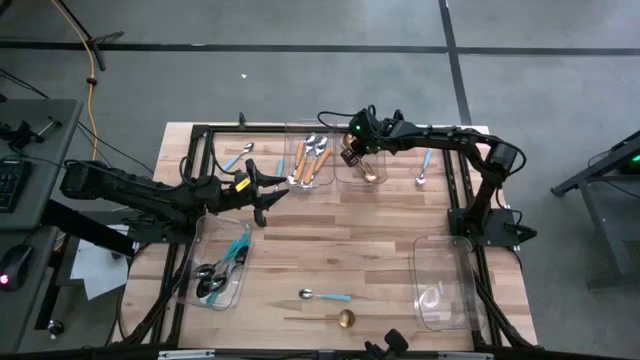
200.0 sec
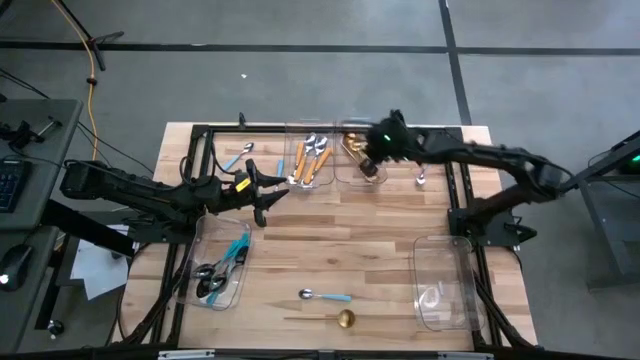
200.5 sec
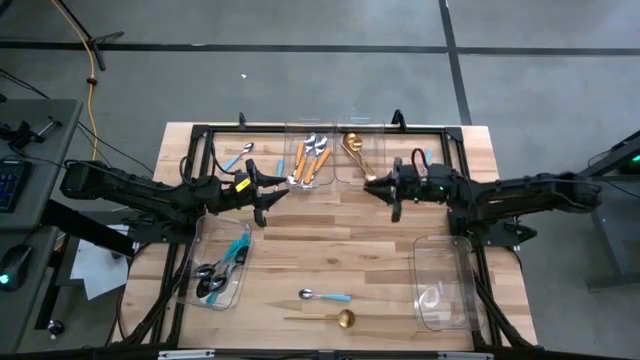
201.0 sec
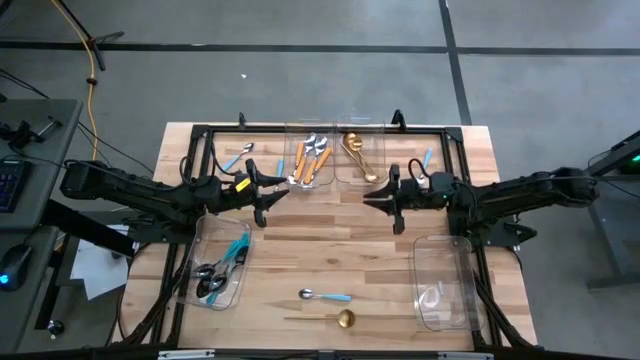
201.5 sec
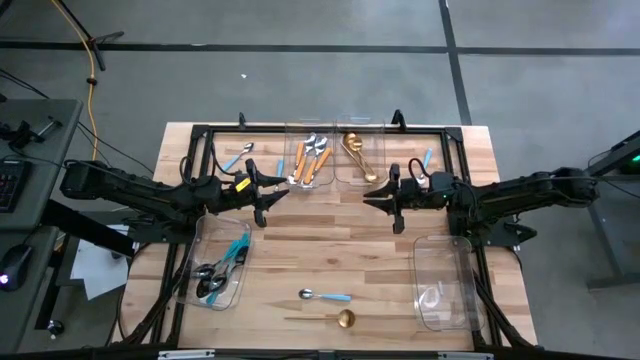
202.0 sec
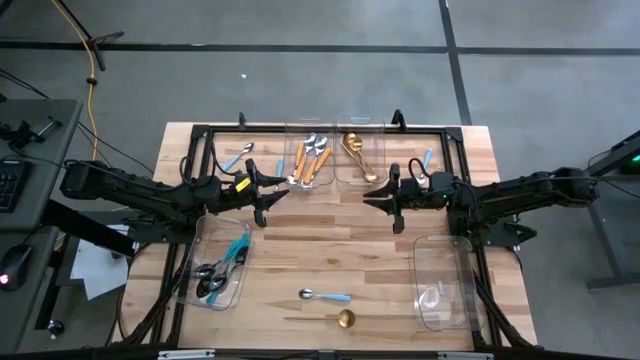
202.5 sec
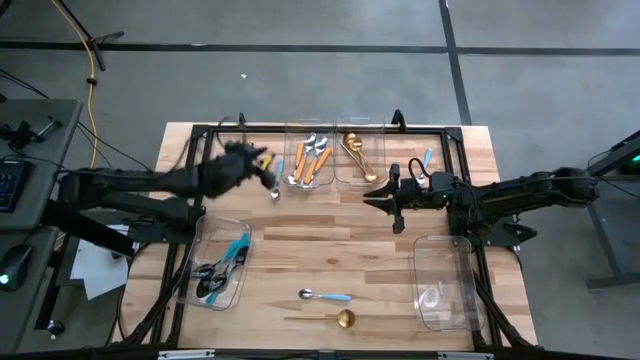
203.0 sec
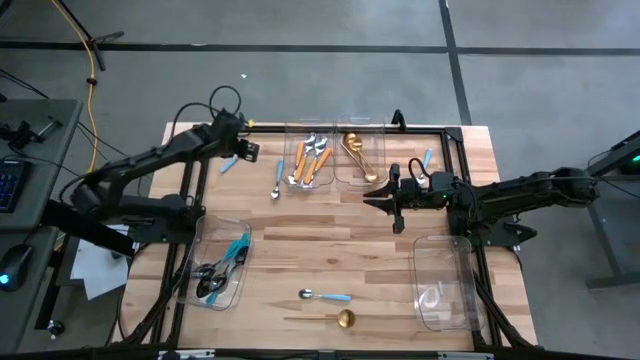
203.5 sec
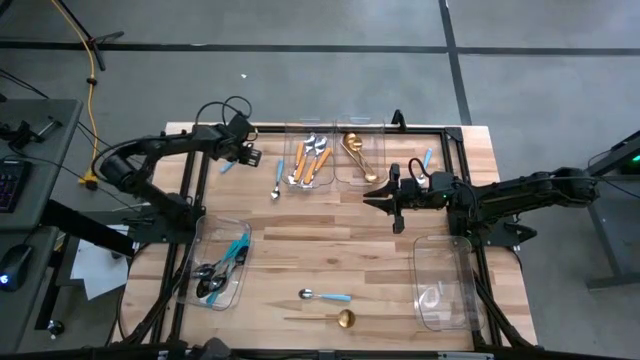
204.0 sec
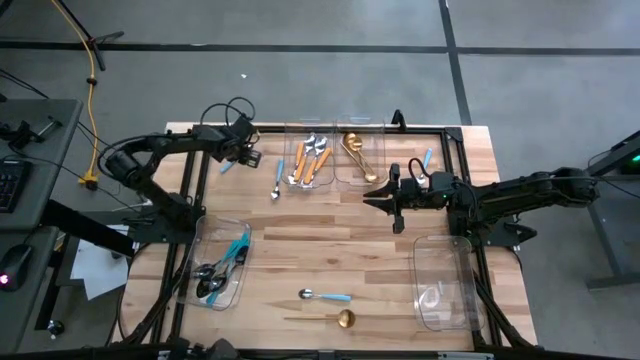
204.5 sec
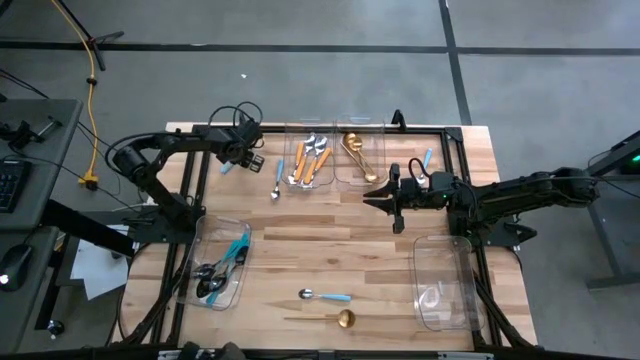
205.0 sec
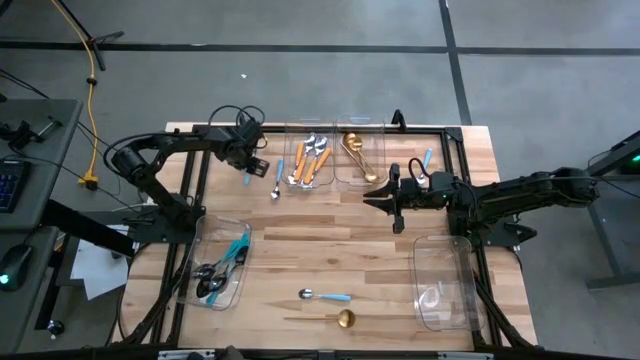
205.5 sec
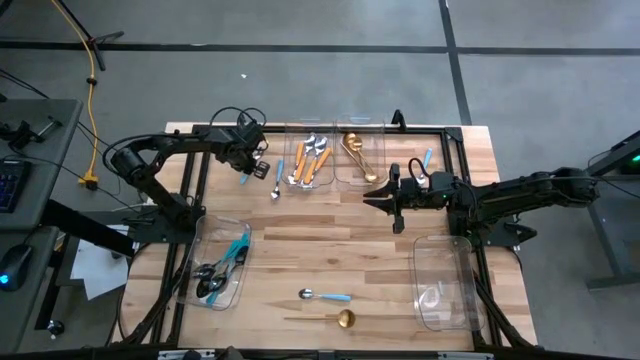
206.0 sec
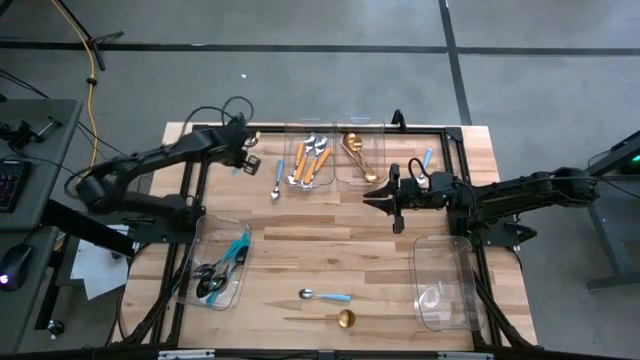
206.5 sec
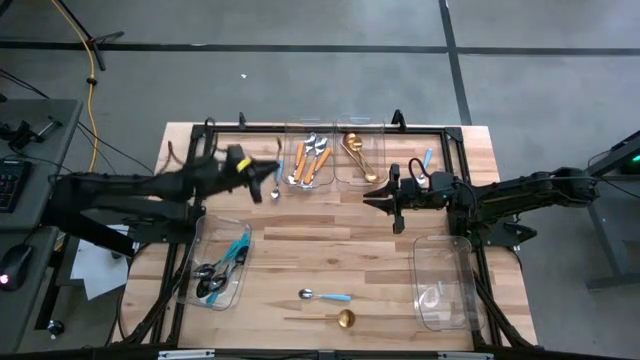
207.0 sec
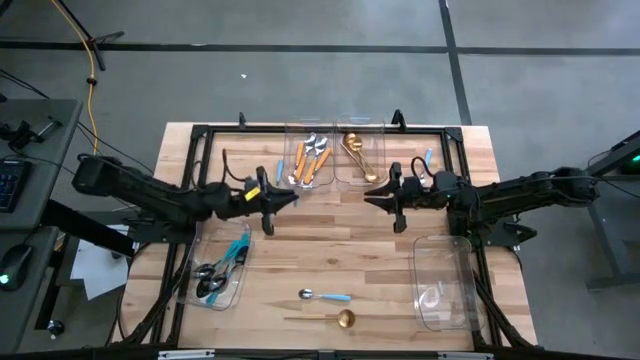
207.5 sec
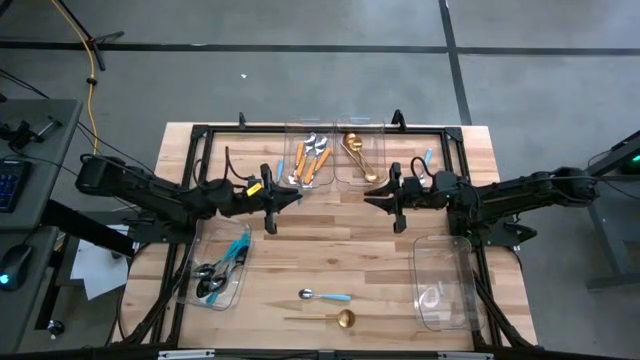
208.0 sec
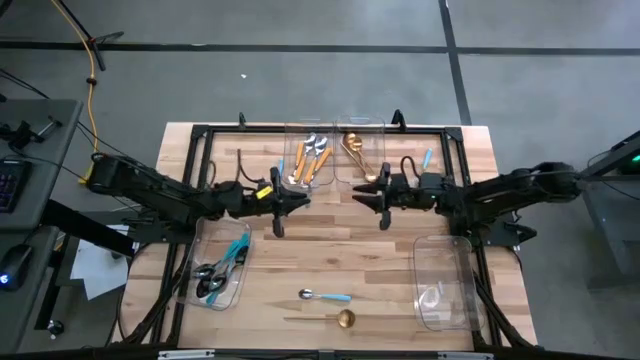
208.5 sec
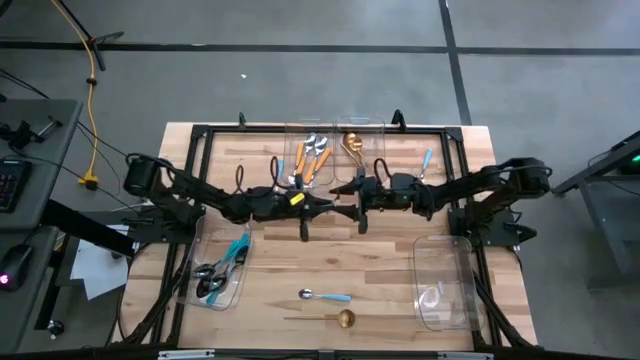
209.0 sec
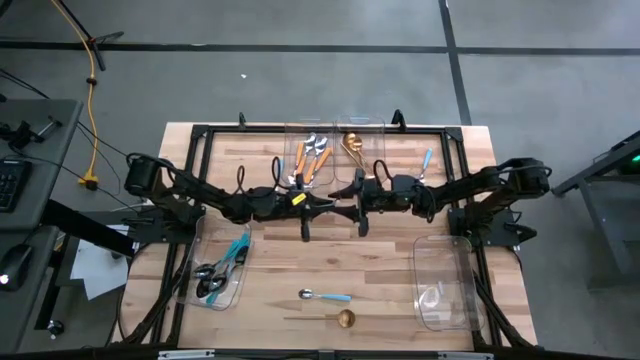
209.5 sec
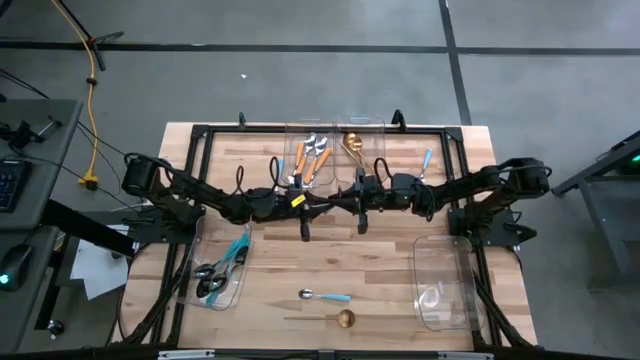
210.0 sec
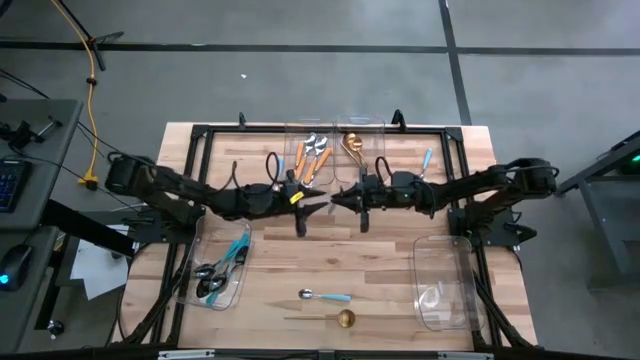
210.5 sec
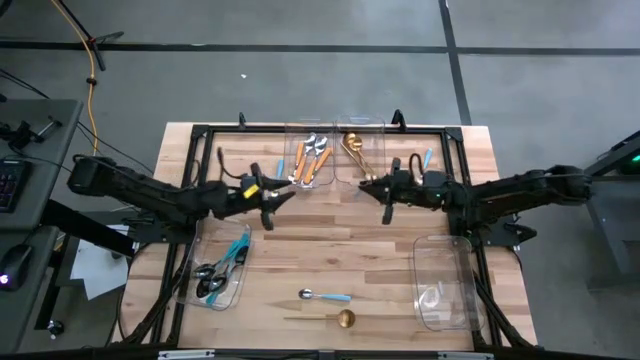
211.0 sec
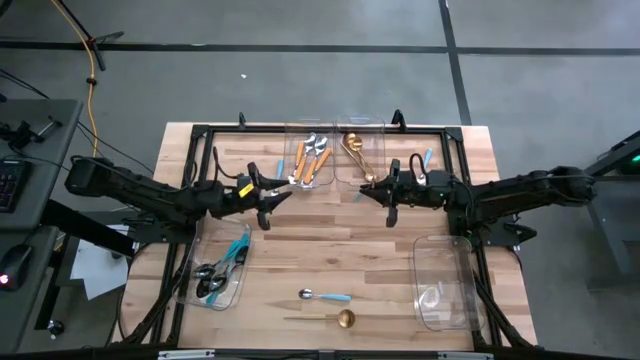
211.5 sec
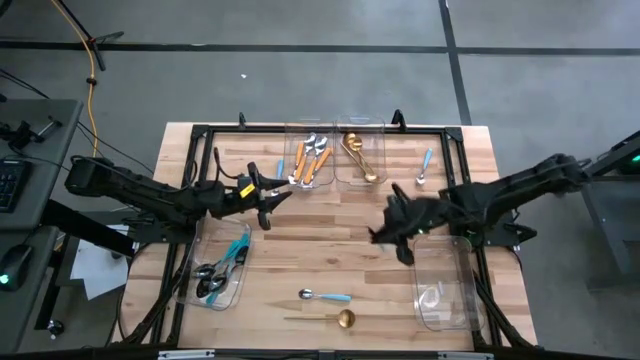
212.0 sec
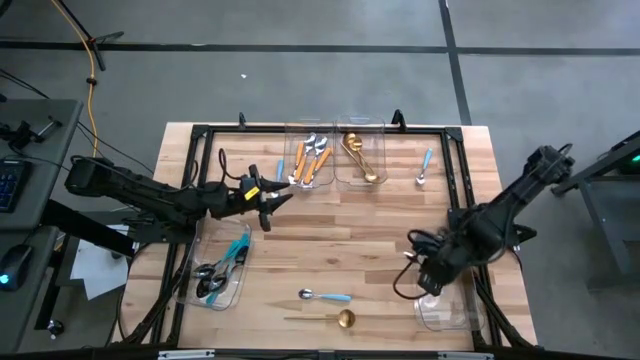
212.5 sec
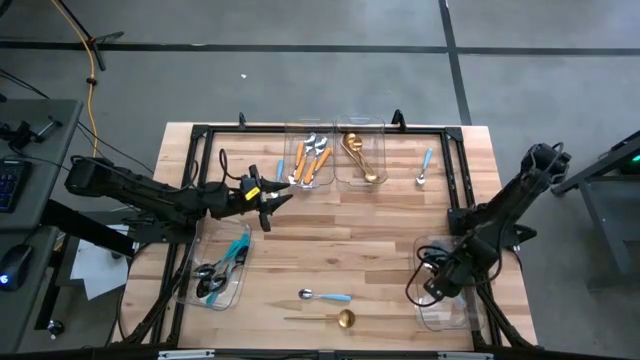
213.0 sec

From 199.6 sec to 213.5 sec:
Task: Sort silverware by color (type)
Put the blue spoon into the bottom right transparent bin

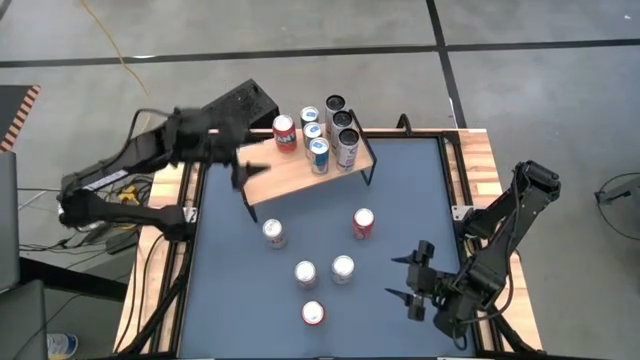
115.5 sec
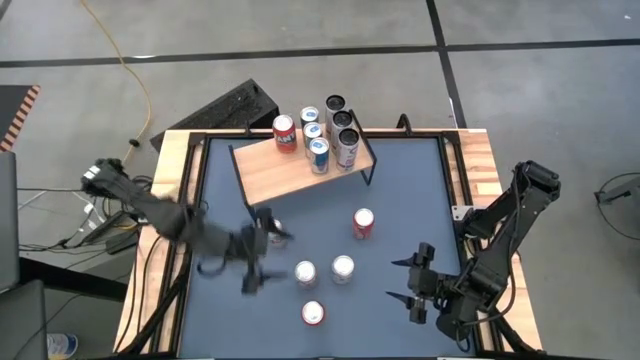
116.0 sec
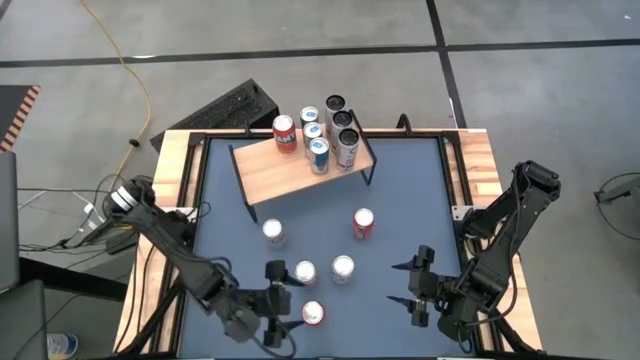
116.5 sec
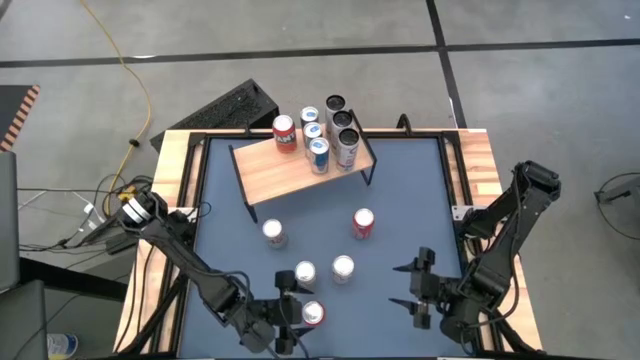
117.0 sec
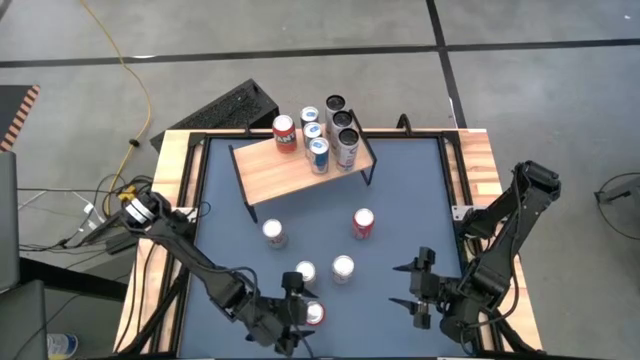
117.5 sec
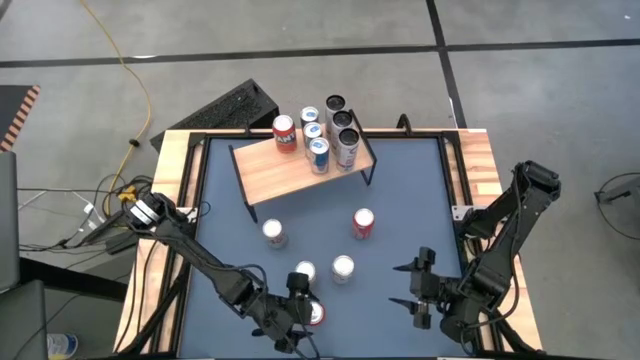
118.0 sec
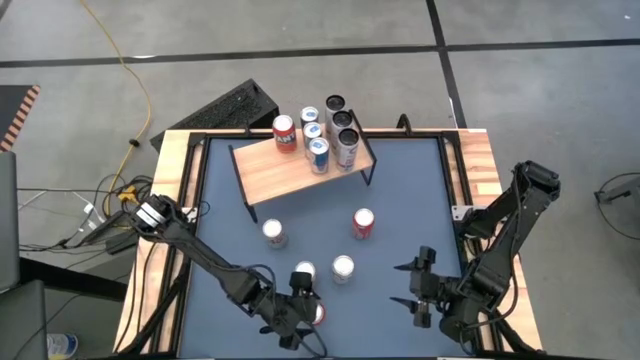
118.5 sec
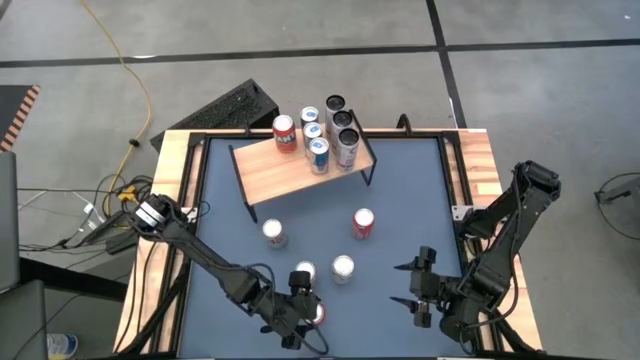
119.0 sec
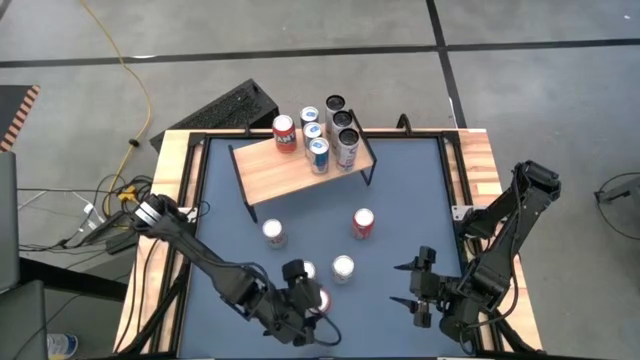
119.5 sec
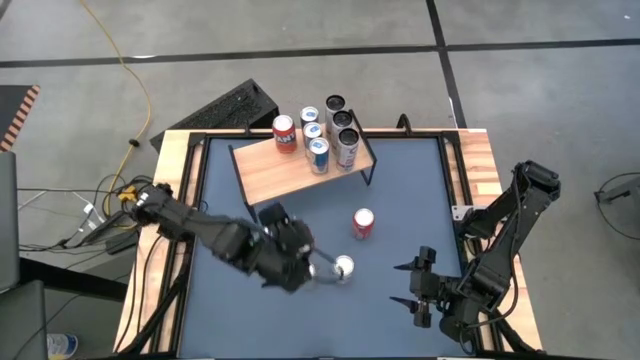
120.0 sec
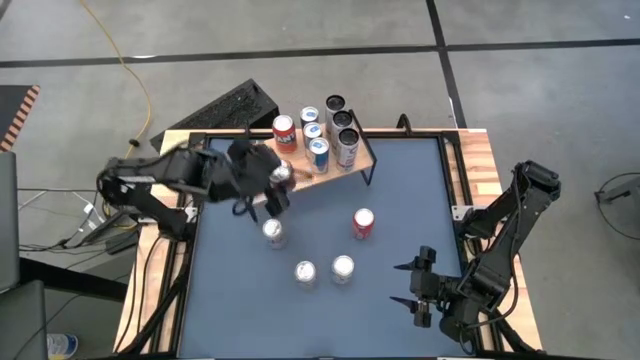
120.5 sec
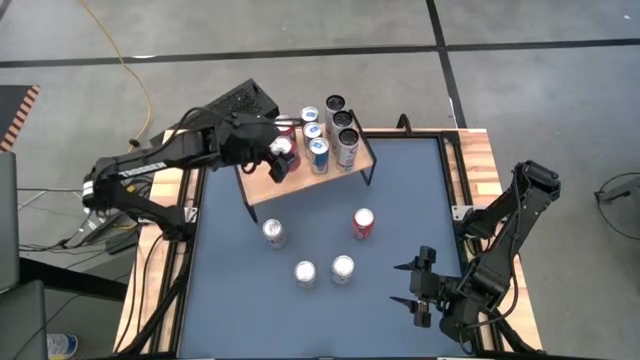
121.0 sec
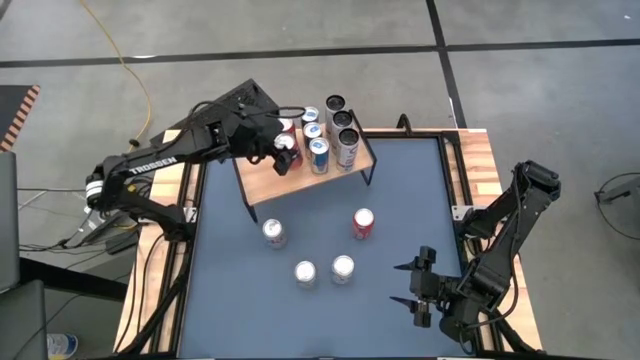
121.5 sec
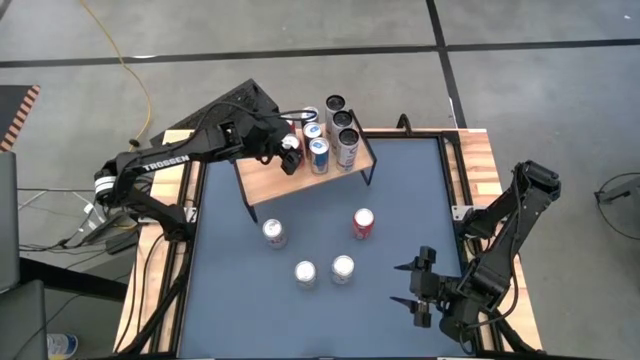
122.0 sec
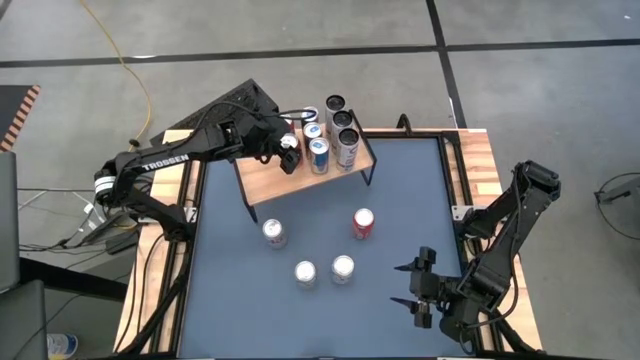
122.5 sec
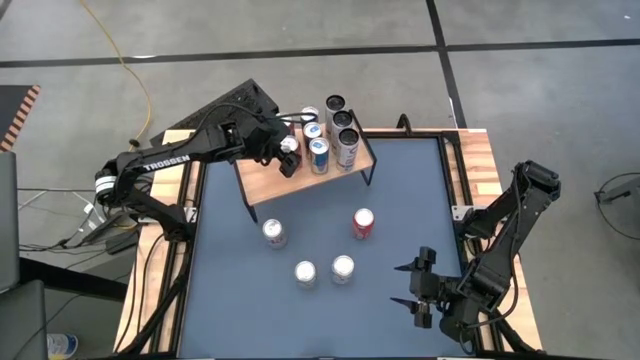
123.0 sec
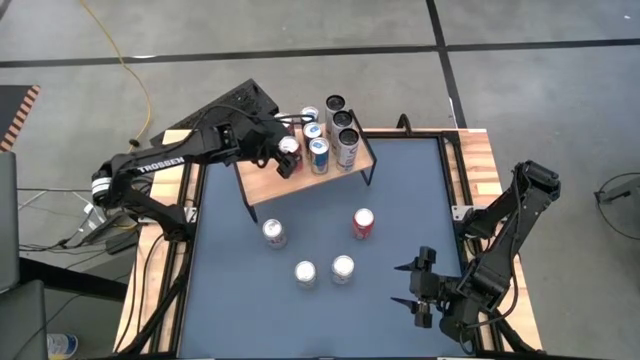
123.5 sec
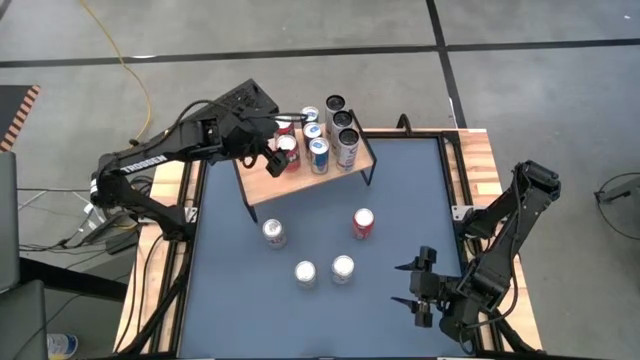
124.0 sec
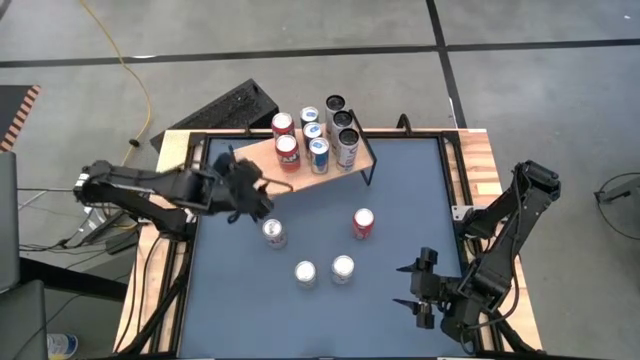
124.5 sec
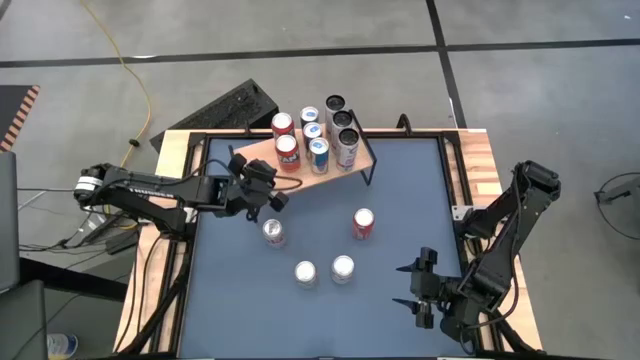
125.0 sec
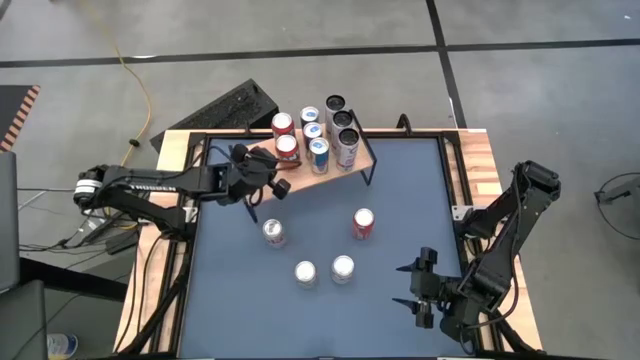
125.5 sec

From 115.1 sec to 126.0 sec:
Task: Place canned beverage on shelf
Put the bottom red soda can on the shelf aligned with the other red soda can
